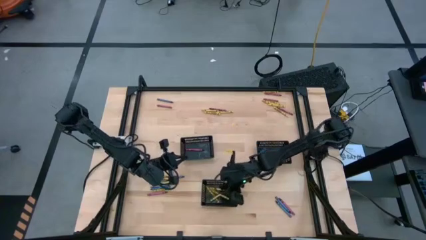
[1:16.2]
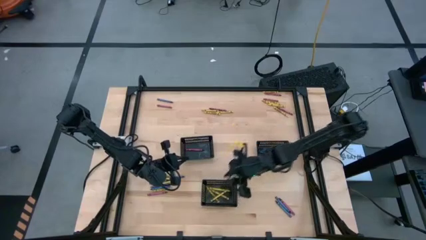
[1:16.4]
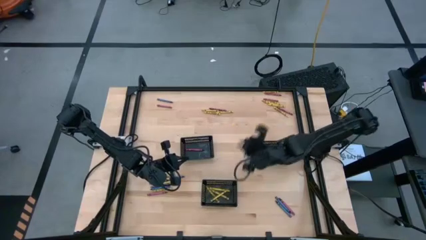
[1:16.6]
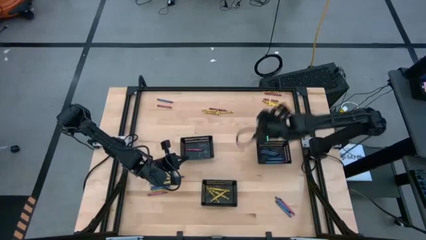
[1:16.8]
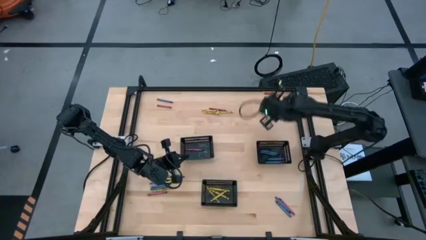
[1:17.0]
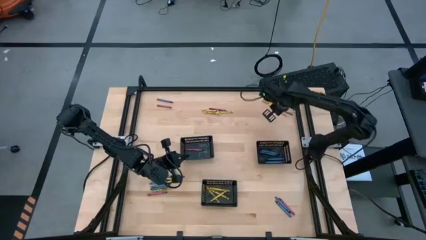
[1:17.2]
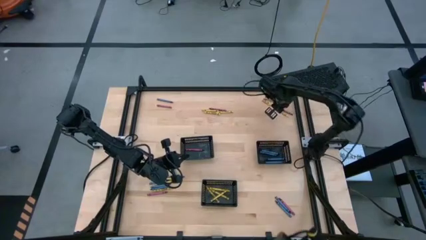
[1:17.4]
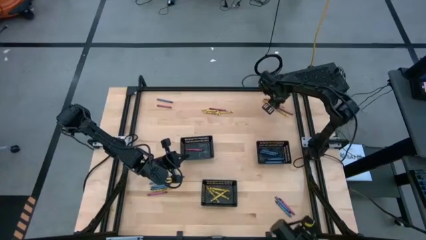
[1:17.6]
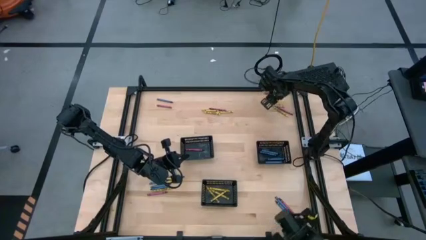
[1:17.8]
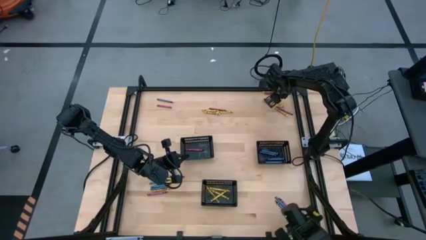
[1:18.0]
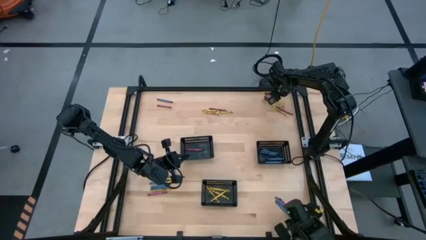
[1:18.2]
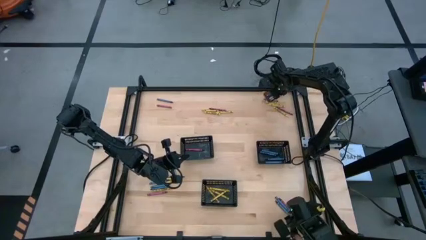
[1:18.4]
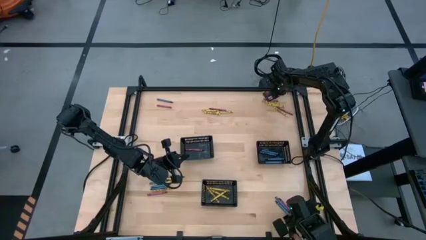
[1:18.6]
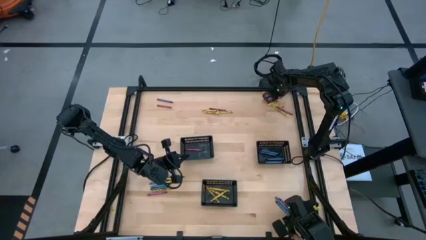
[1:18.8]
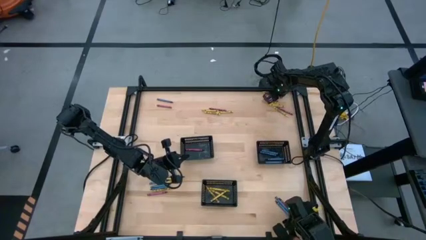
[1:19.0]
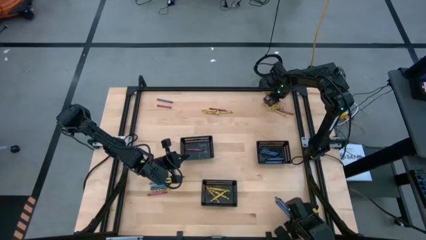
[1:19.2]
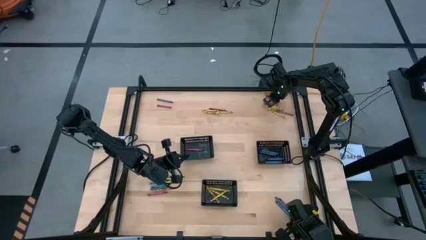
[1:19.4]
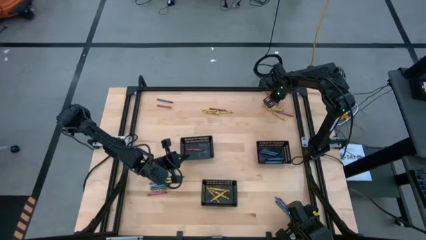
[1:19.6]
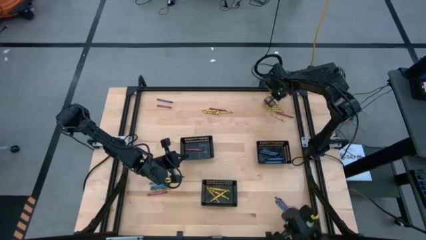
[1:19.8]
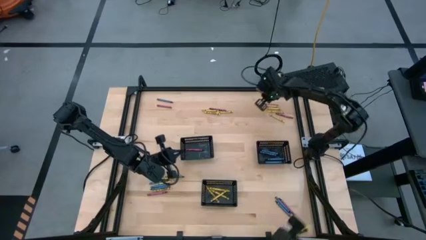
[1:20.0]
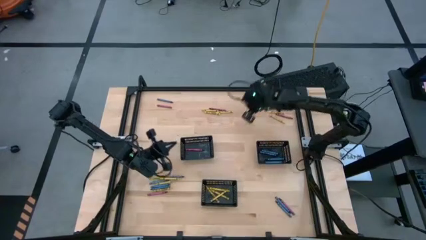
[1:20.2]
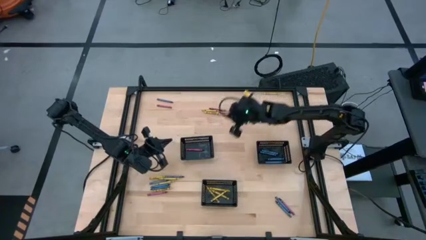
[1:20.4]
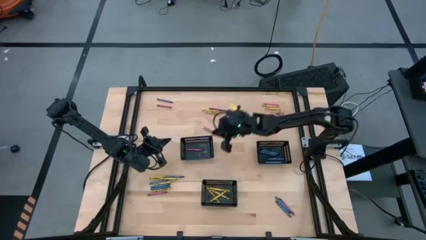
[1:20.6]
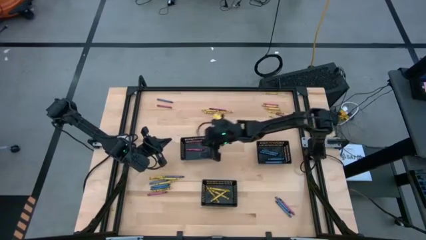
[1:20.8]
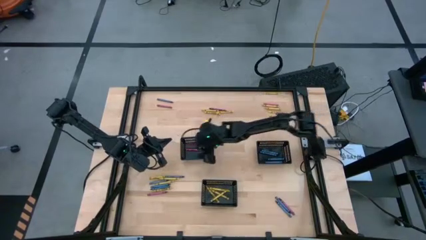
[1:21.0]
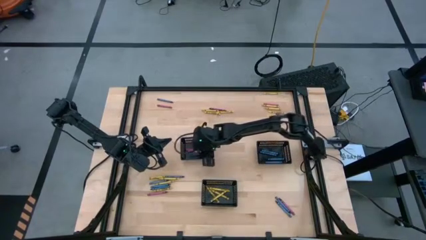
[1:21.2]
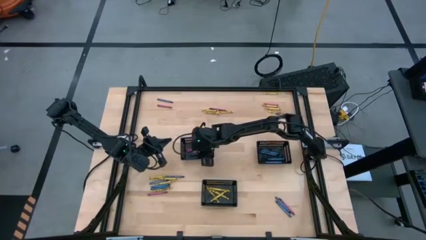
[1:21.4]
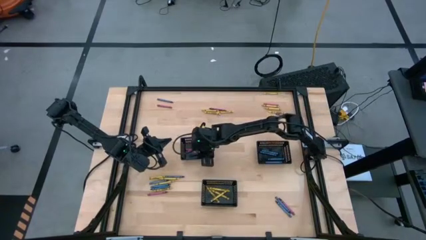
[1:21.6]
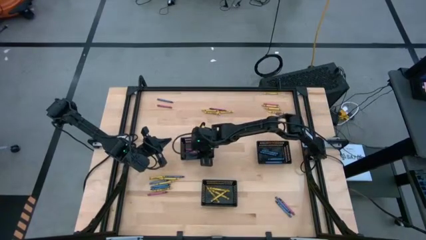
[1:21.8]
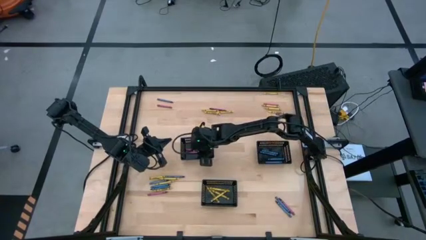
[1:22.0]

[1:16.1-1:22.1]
Task: Sort crayons
Put the red crayon into the left black bin

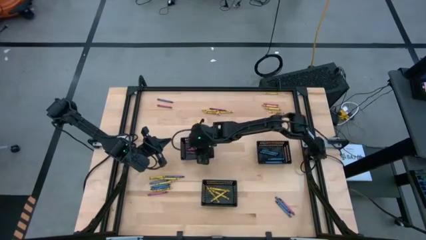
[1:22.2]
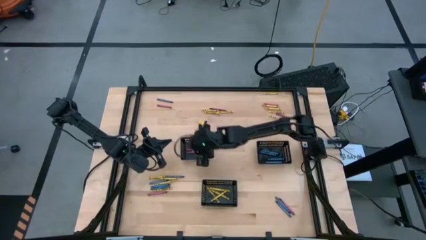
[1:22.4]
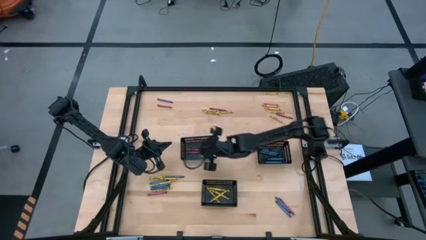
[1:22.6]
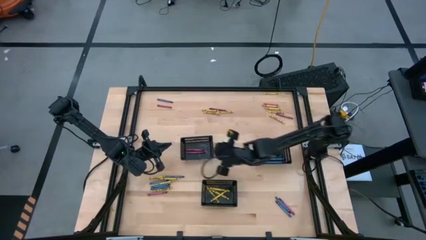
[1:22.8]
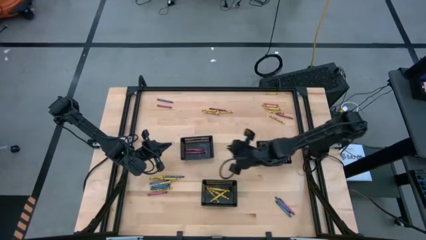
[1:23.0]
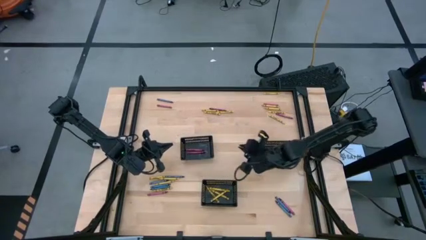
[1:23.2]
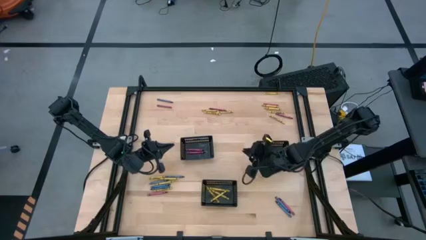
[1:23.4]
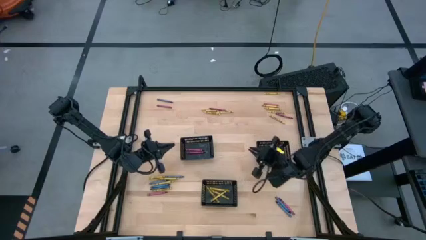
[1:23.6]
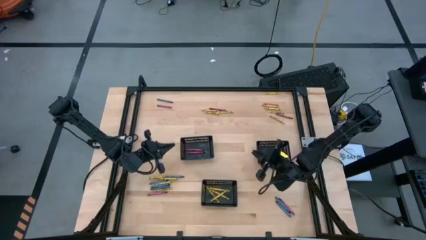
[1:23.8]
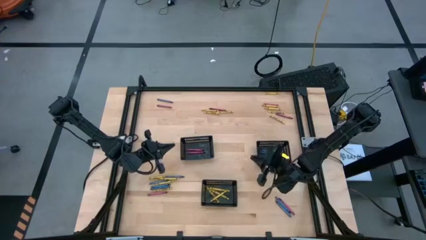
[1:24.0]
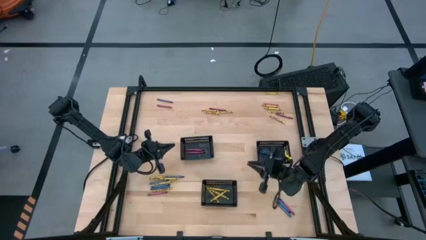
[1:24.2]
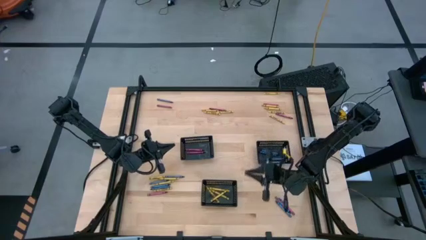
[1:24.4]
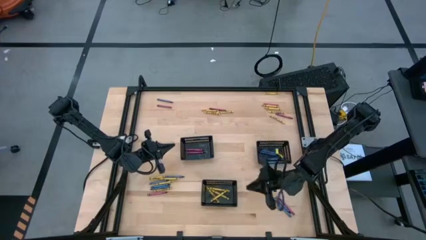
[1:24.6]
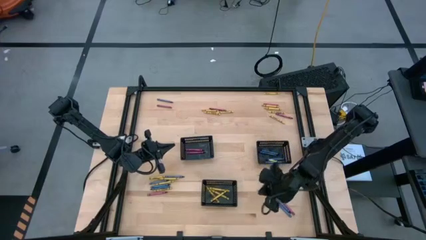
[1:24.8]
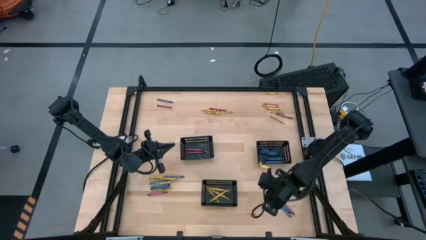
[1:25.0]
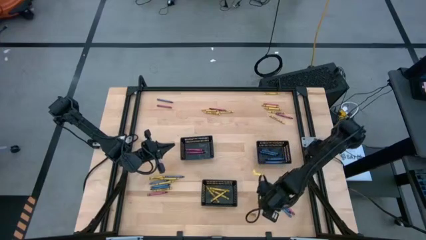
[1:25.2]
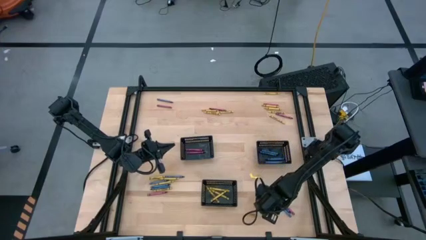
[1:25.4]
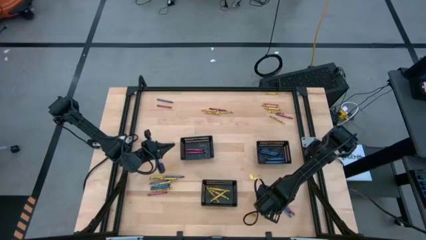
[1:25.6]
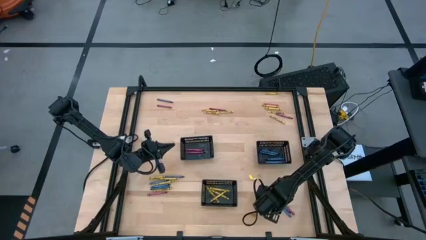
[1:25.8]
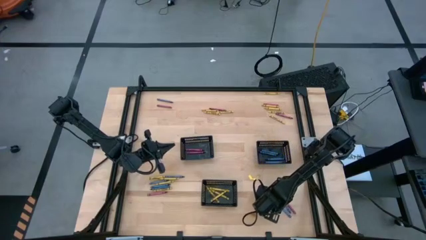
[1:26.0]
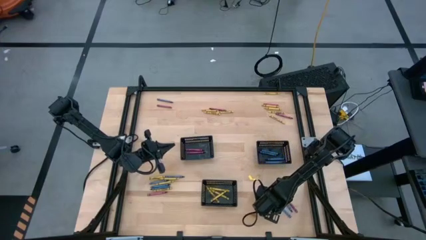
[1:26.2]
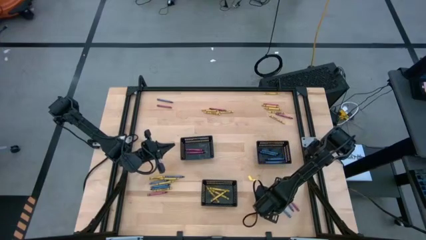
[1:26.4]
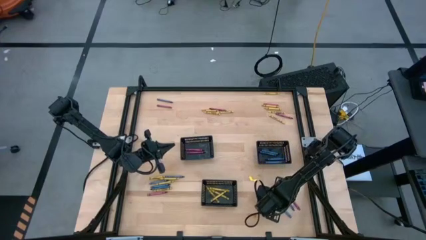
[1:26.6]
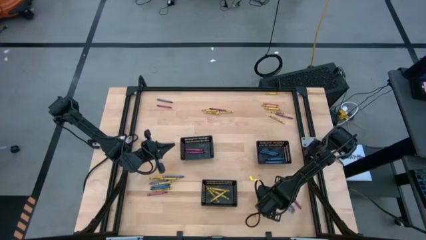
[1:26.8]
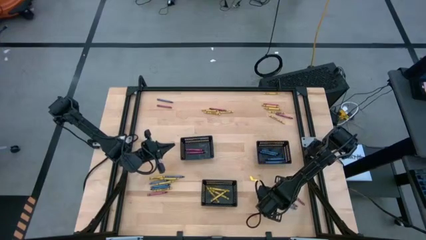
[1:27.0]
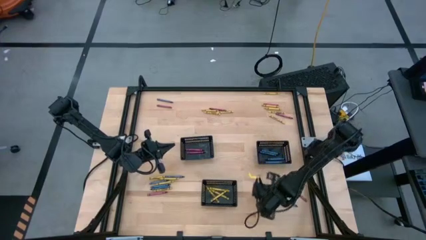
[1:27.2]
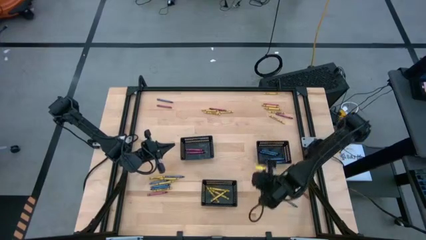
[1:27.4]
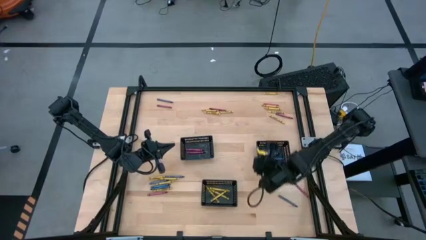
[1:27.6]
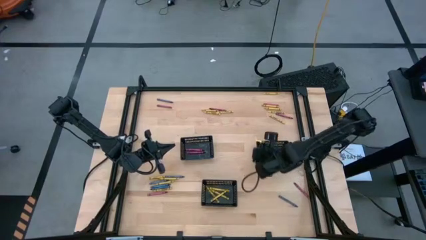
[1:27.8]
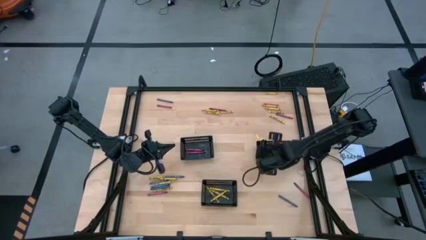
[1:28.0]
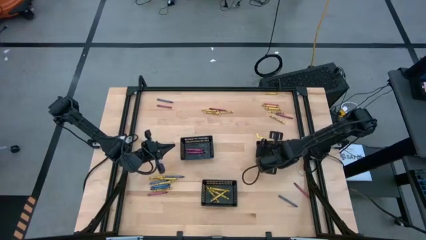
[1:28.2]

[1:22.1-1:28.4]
Put the blue crayon into the right black bin

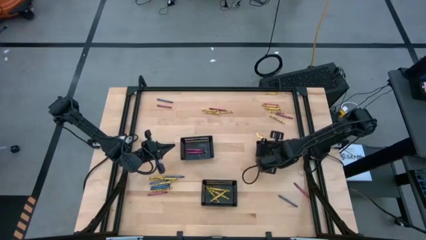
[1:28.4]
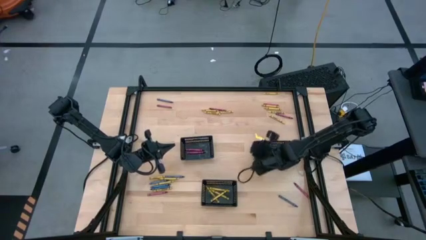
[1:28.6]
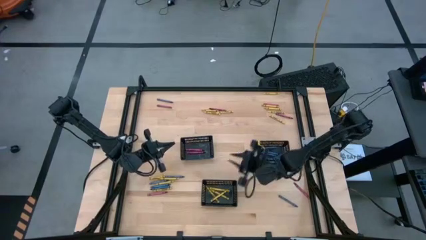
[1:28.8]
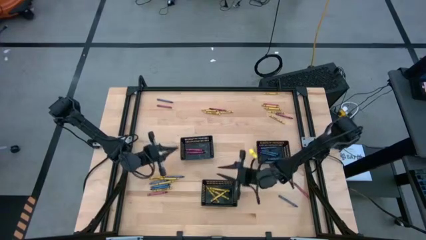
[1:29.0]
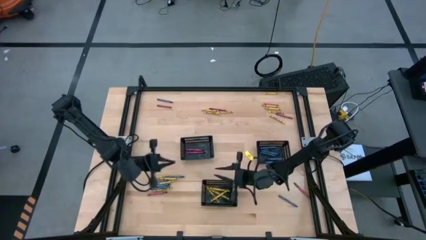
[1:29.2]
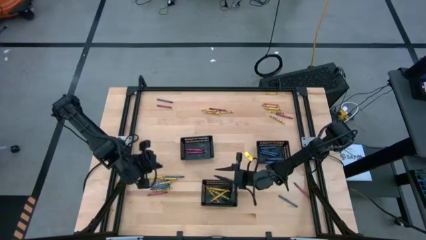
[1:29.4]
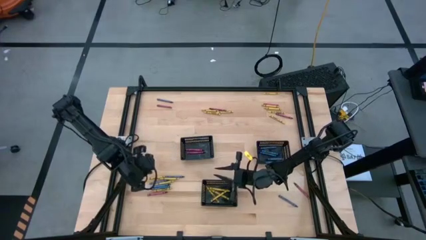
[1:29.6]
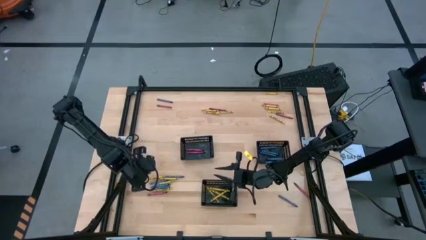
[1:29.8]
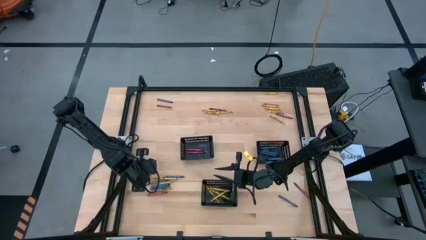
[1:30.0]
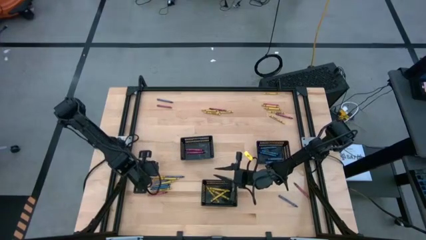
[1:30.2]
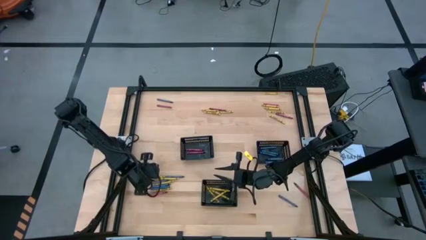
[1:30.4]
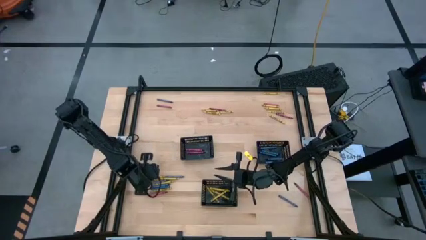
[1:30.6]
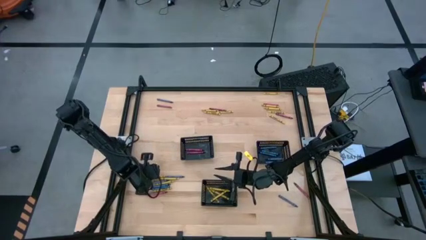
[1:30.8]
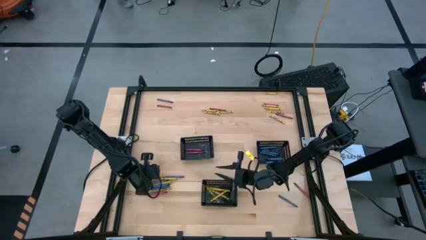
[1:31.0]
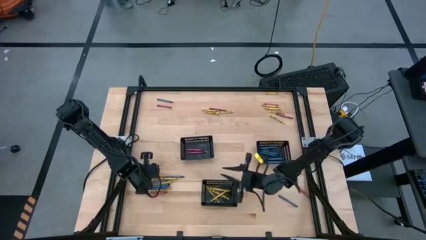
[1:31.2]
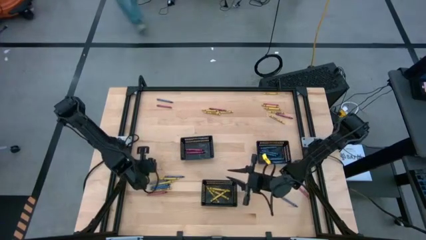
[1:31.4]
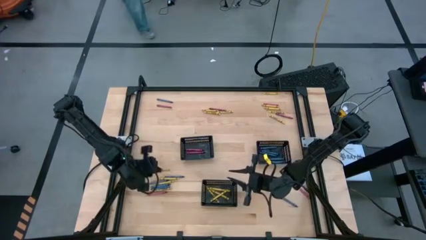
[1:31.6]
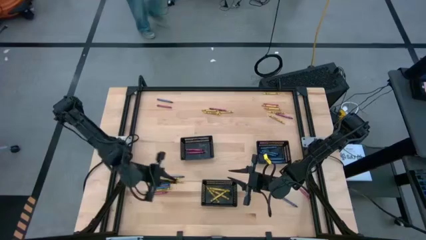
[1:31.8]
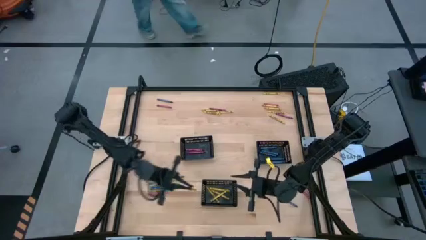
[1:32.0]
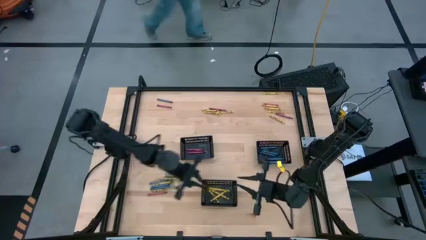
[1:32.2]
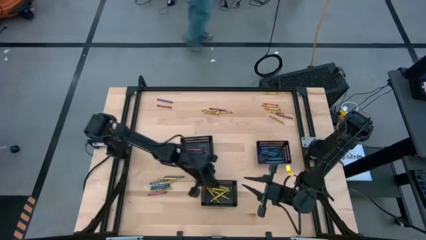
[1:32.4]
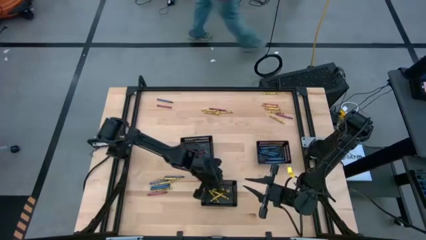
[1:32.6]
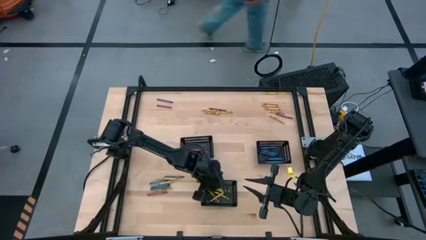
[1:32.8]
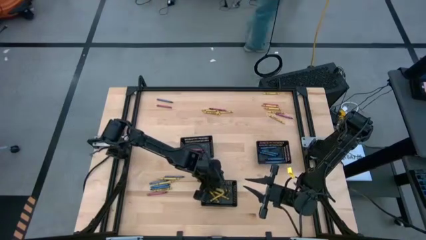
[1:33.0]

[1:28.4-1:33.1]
Put the yellow crayon into the bottom black bin
